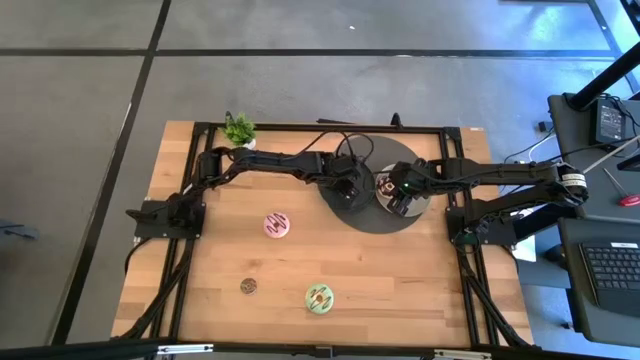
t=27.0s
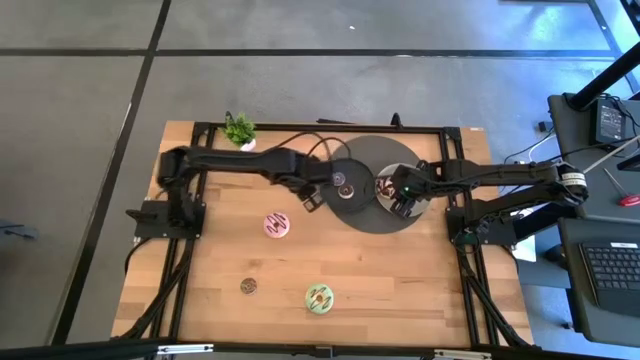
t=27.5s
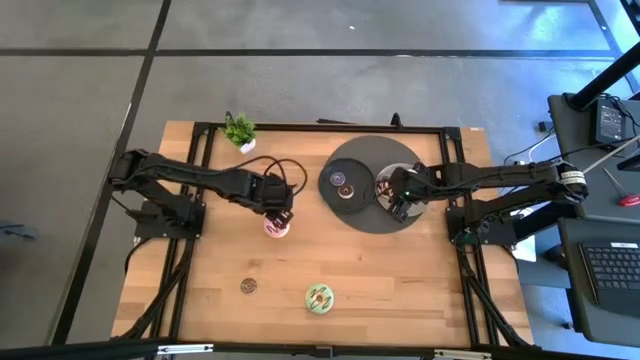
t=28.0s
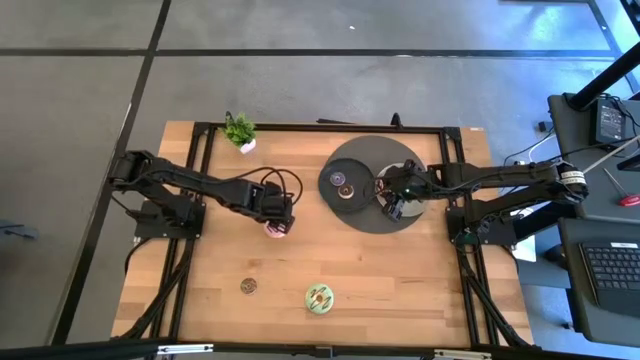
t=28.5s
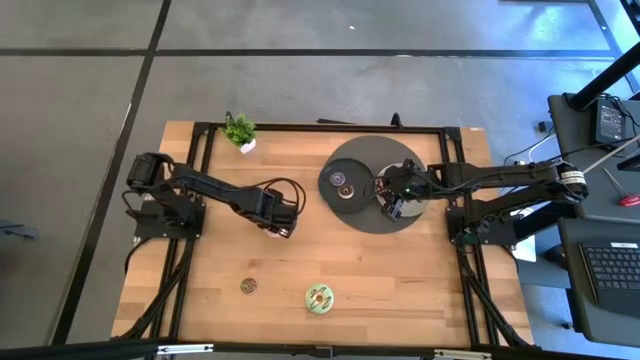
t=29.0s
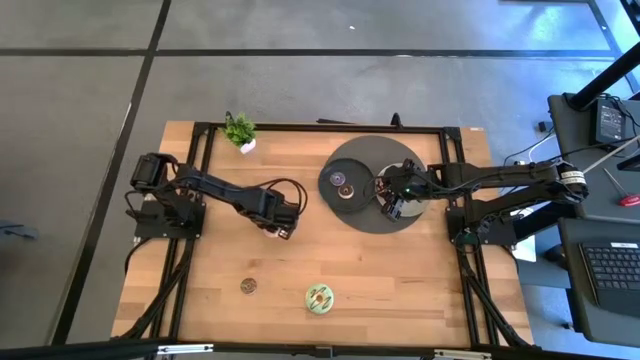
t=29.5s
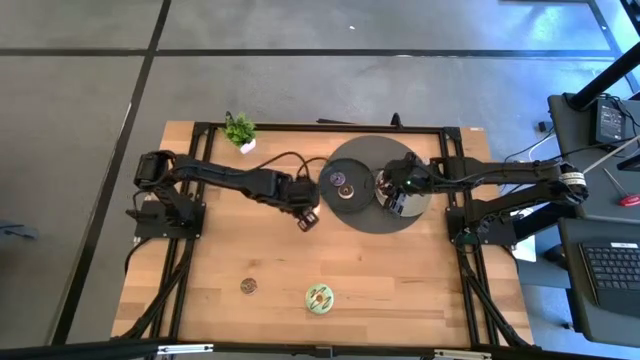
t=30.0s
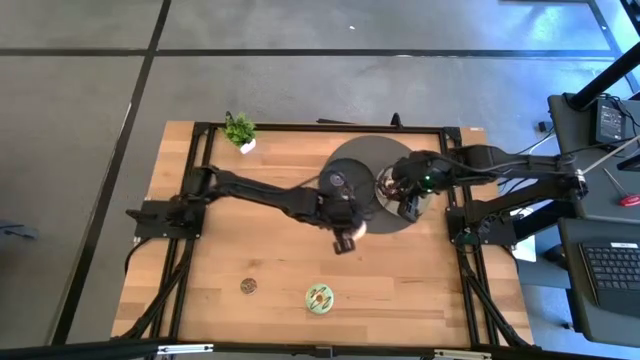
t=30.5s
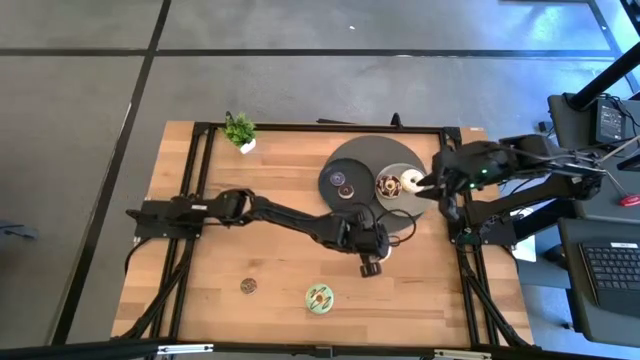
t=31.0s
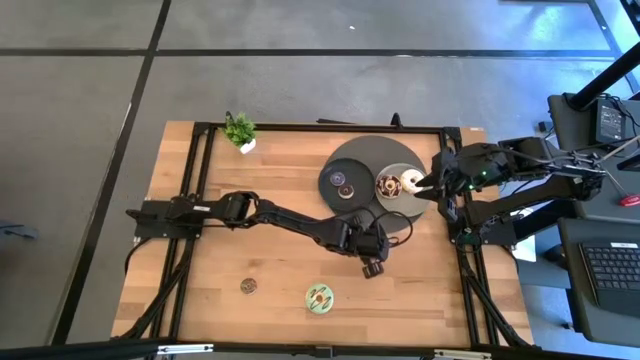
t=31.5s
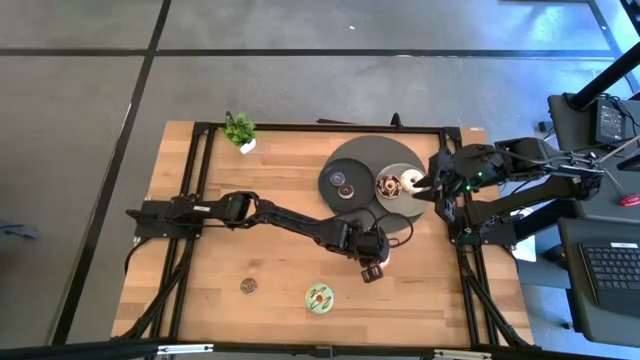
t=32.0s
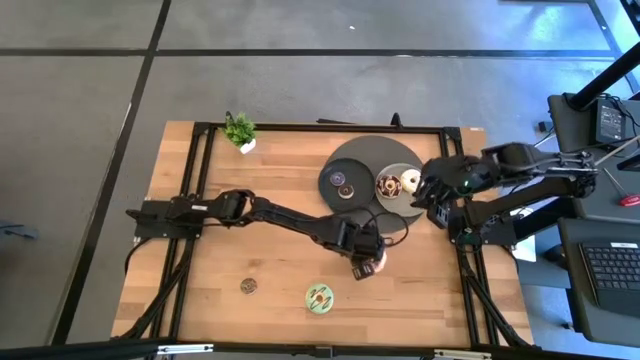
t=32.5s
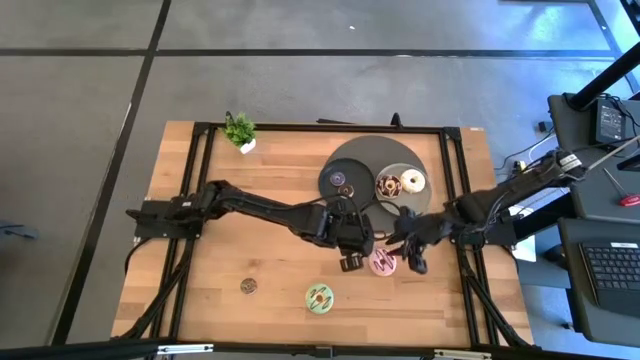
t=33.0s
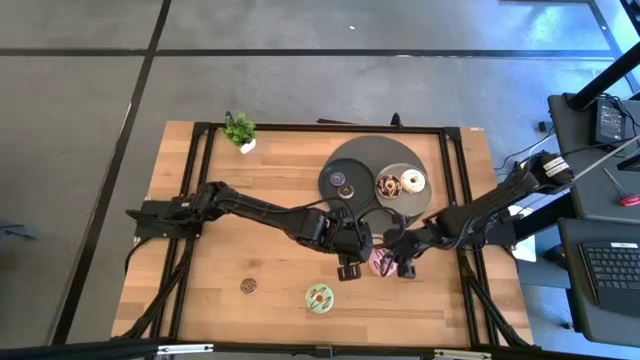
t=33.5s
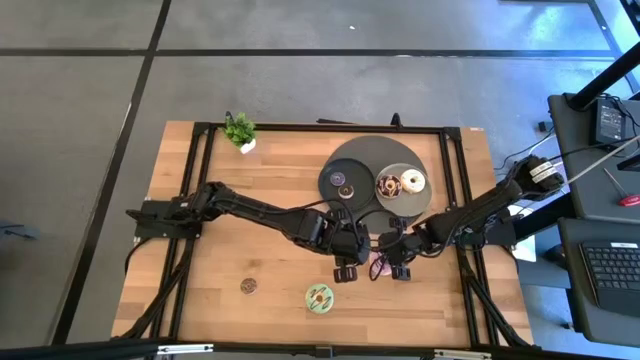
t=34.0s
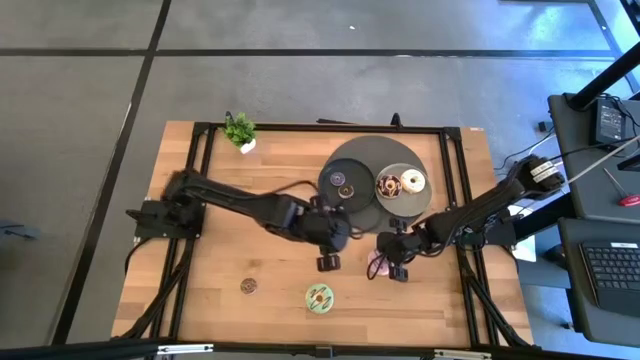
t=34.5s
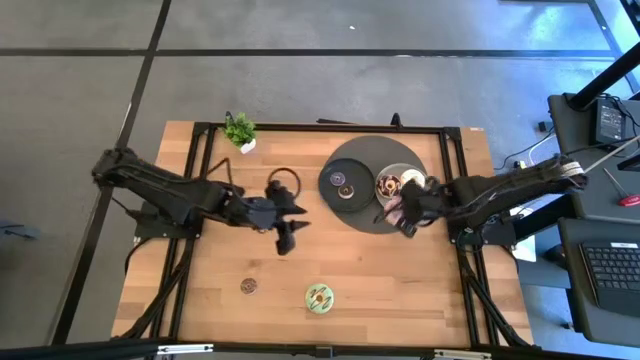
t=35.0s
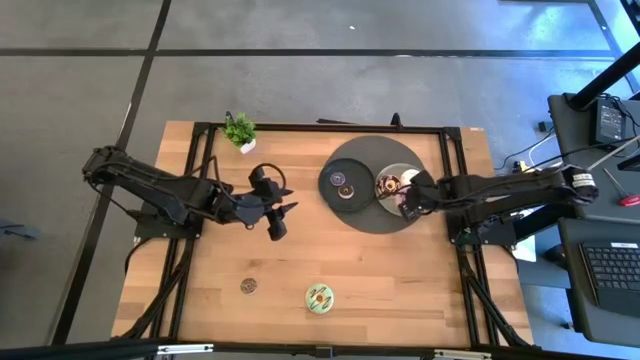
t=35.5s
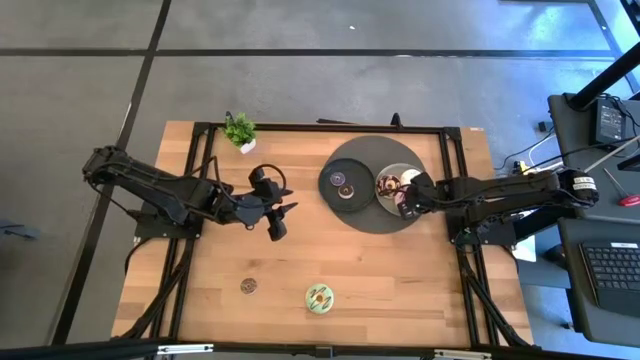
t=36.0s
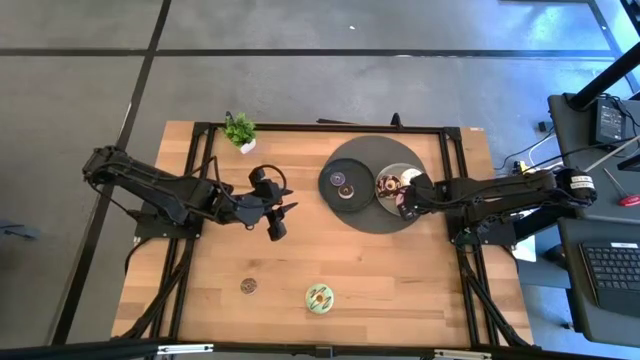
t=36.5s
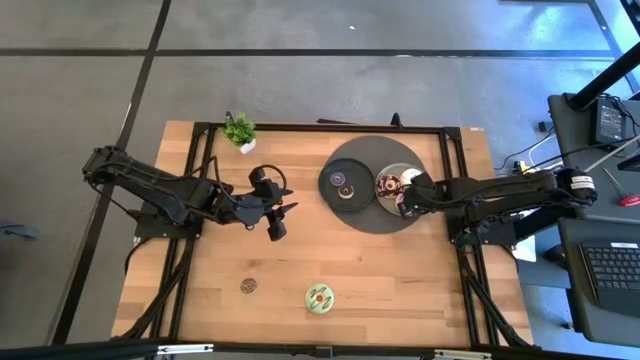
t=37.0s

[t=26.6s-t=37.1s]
Task: Pick & Place donuts
Put the large purple donut on the gray plate

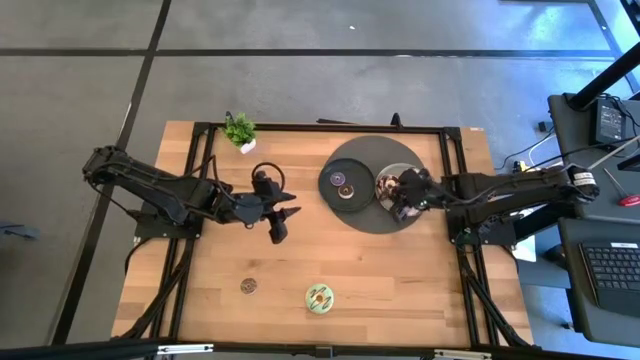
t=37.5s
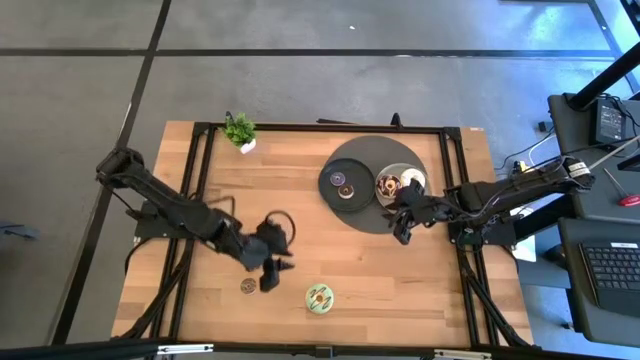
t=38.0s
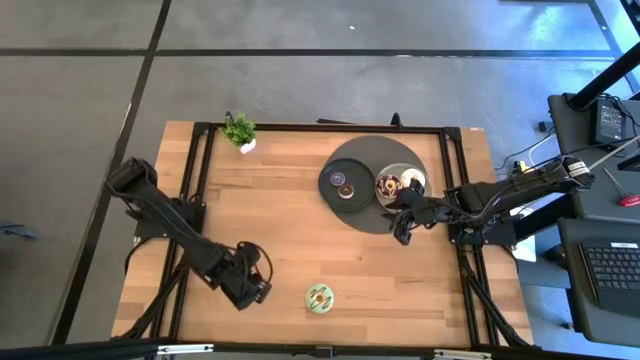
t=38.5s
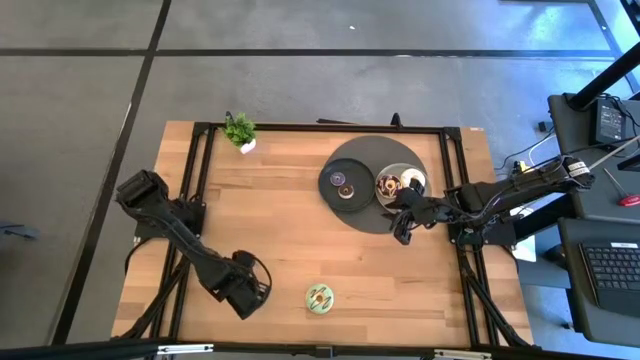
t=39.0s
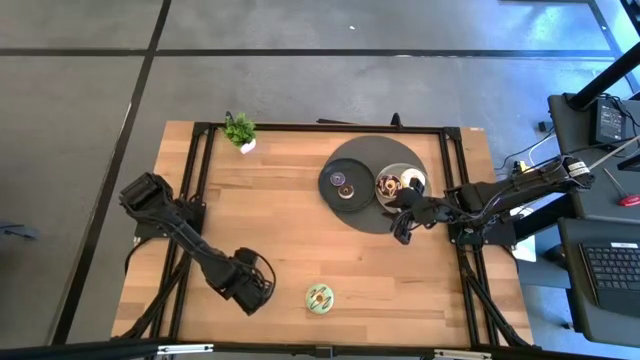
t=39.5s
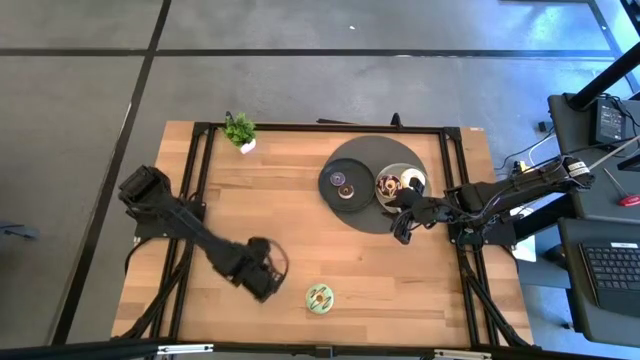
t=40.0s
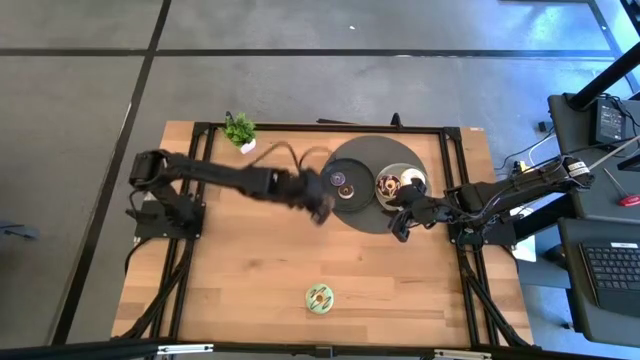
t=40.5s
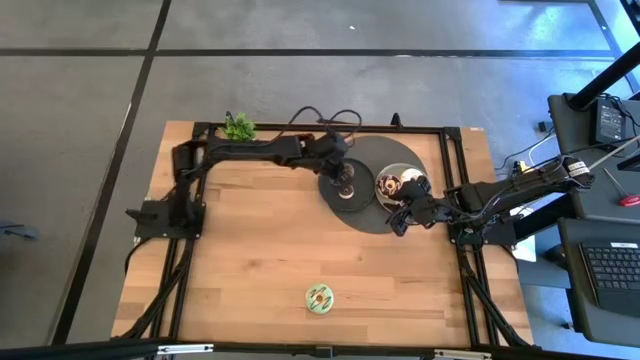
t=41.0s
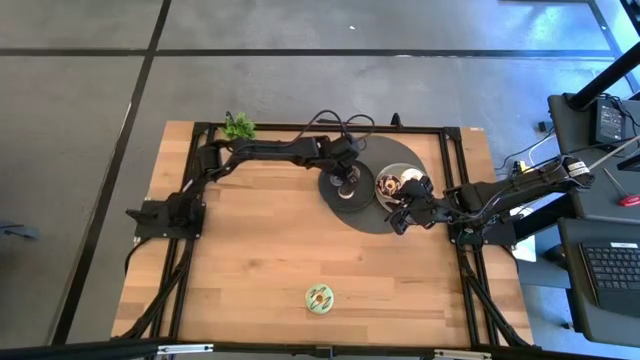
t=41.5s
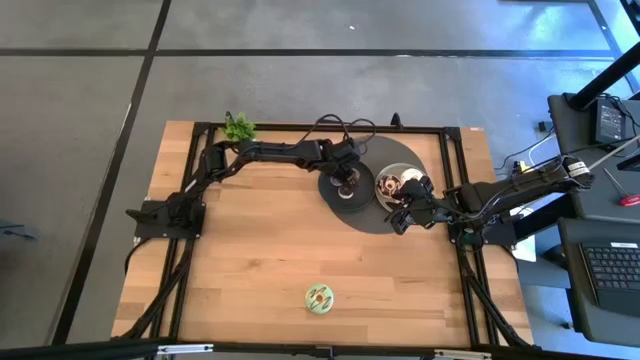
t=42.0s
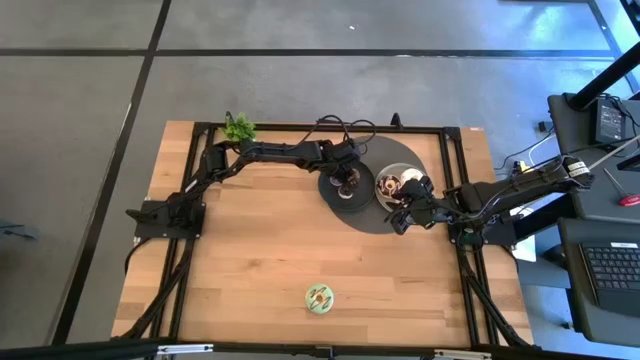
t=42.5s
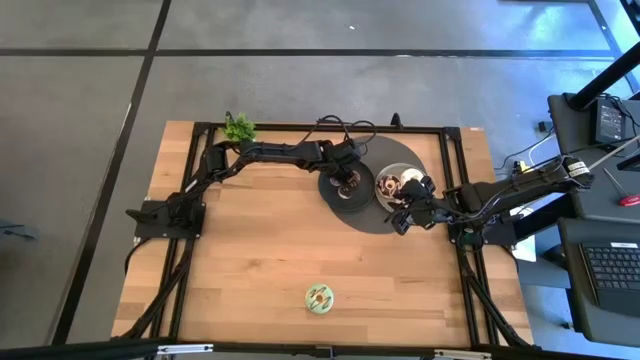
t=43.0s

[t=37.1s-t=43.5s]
Put the brown donut on the black plate

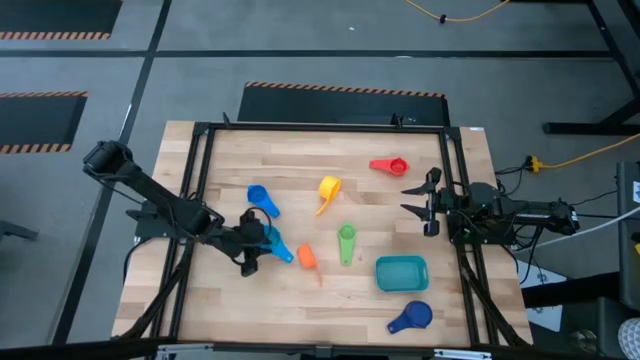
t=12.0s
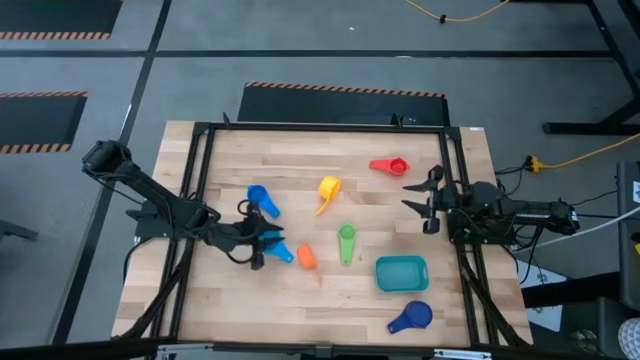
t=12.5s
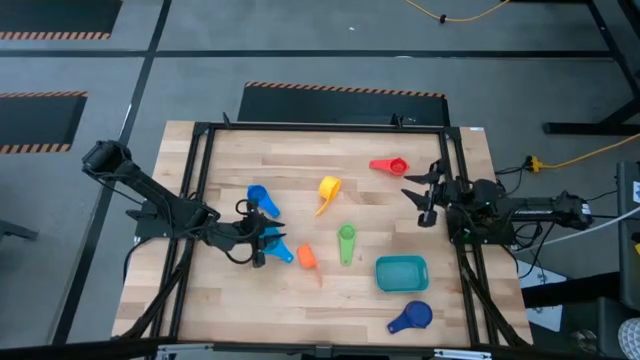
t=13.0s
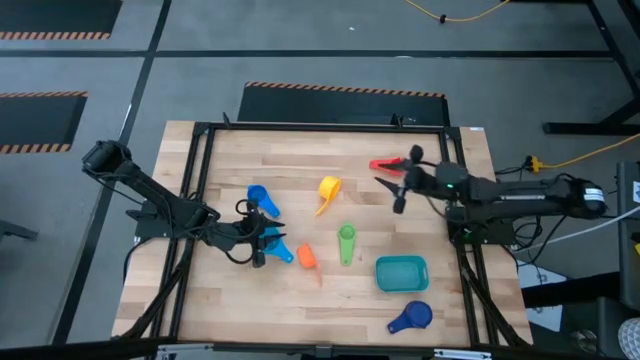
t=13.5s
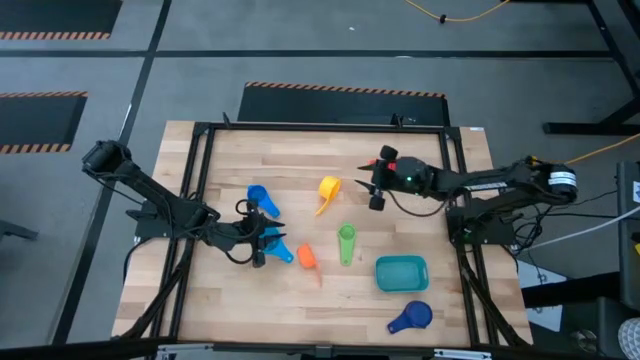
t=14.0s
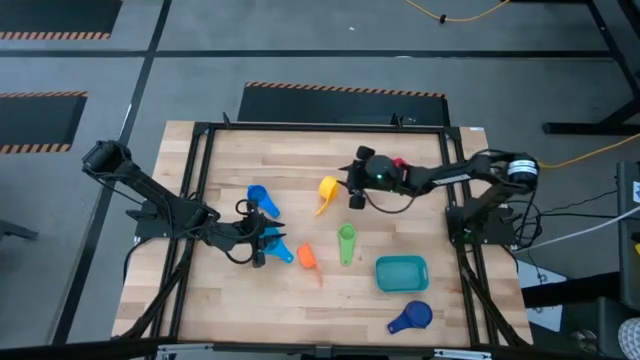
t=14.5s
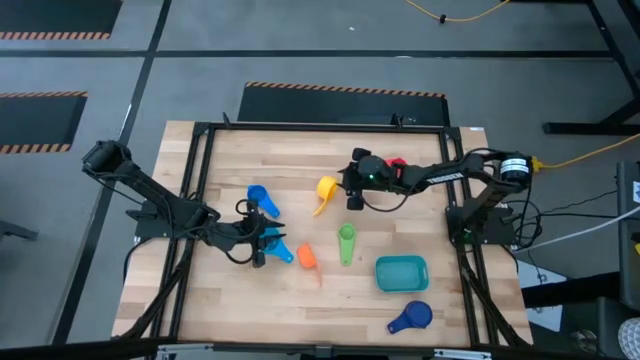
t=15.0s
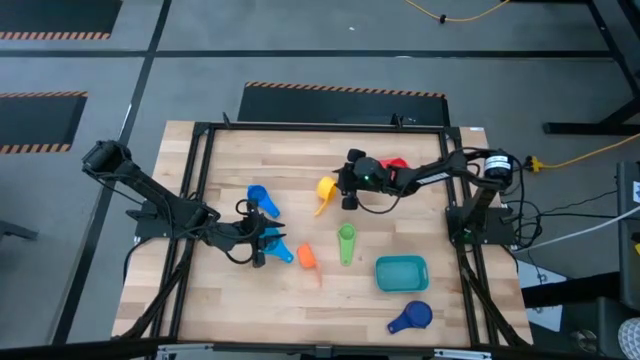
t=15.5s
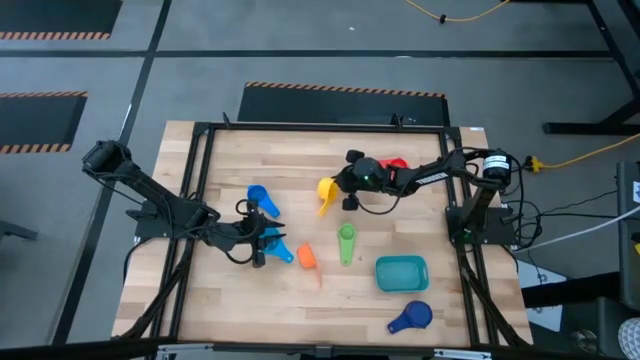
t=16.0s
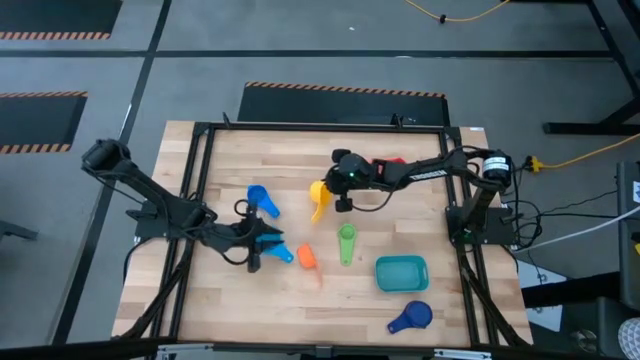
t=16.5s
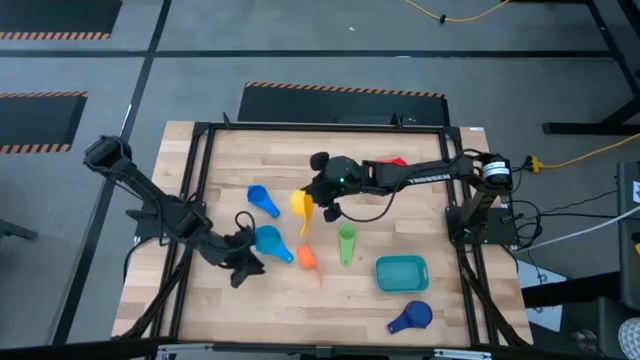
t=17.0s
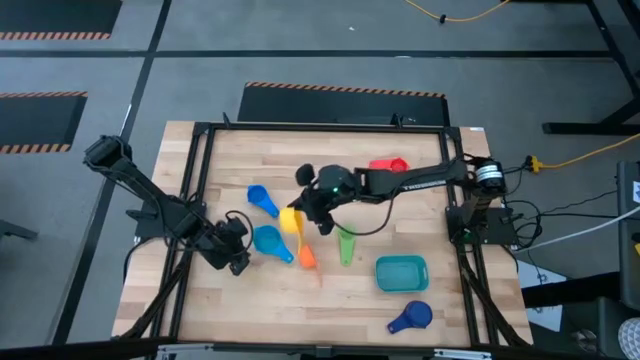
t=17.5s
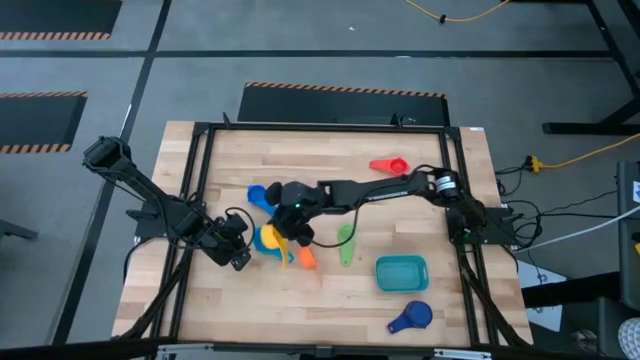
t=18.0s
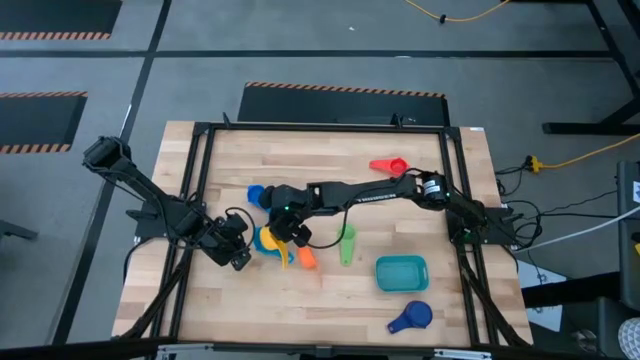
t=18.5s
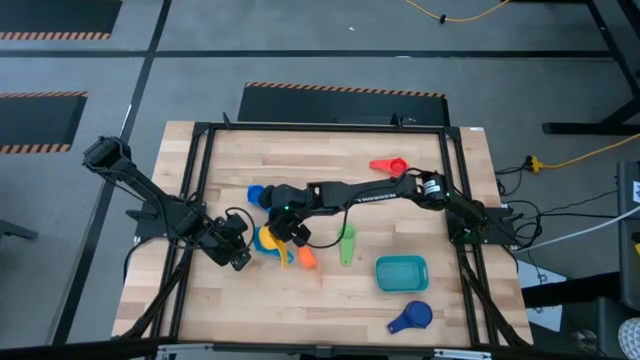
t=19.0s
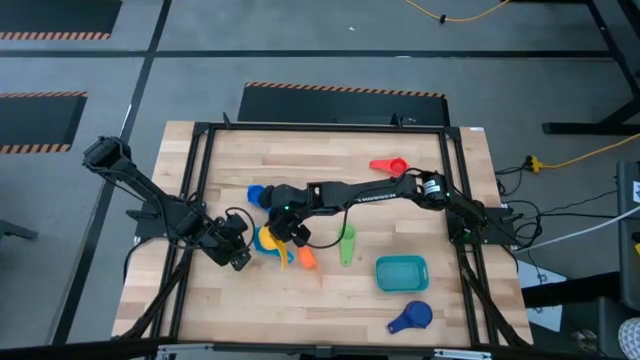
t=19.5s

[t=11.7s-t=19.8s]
Task: Nest measuring cups in basket
Stack the yellow measuring nest cup into the light blue measuring nest cup
